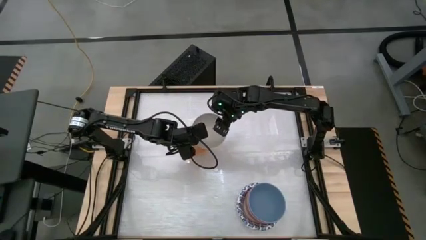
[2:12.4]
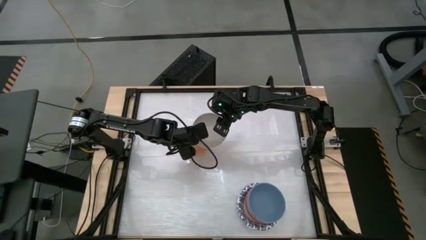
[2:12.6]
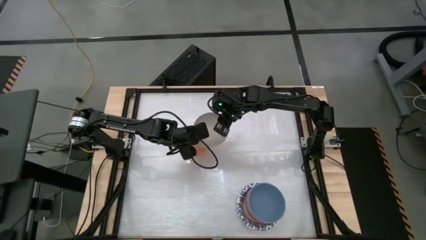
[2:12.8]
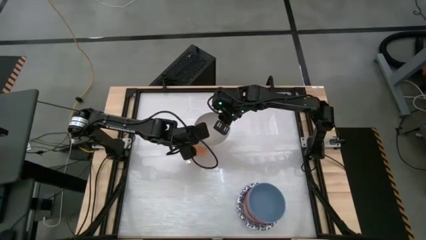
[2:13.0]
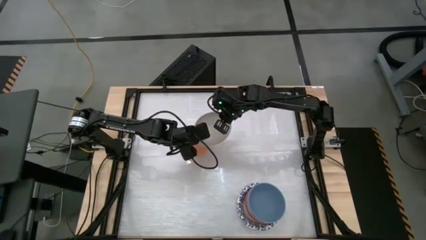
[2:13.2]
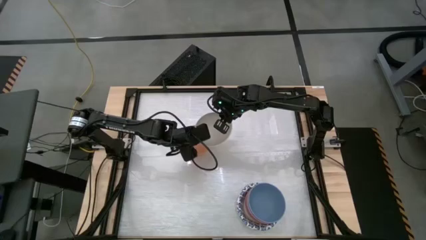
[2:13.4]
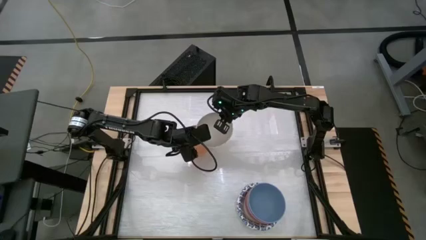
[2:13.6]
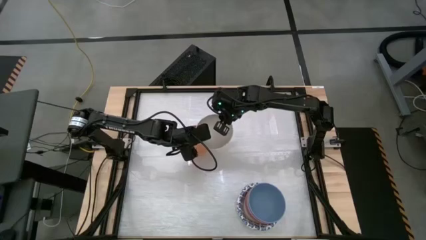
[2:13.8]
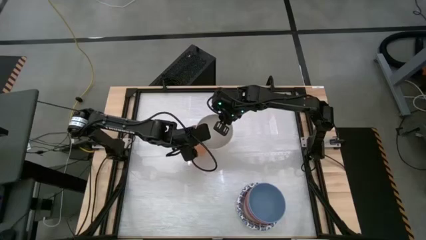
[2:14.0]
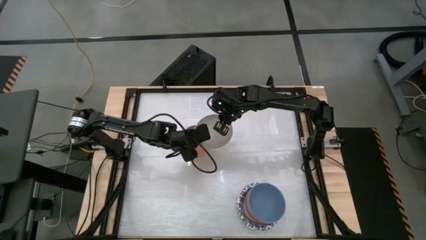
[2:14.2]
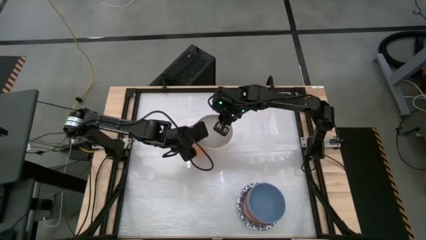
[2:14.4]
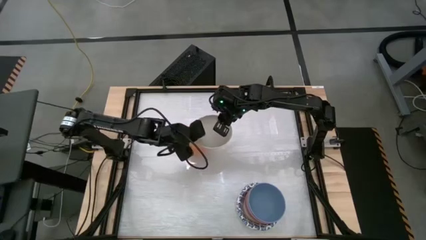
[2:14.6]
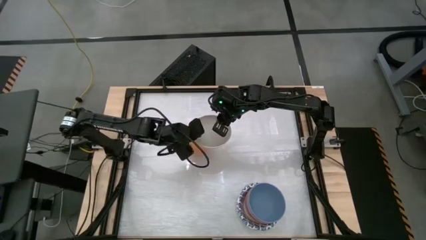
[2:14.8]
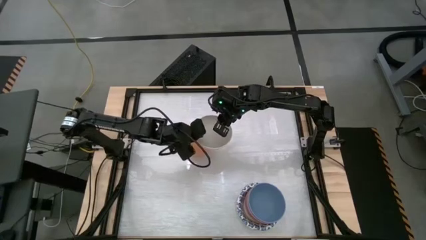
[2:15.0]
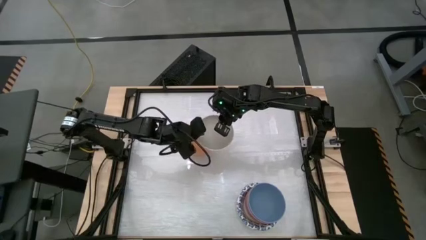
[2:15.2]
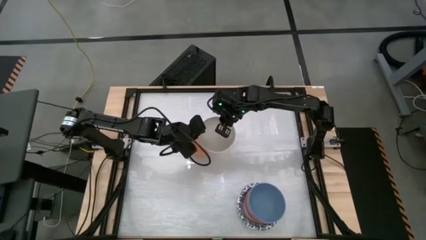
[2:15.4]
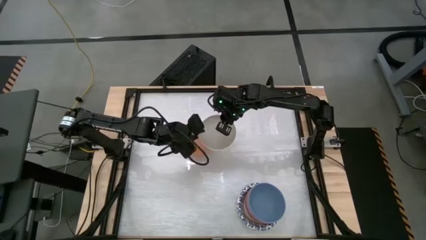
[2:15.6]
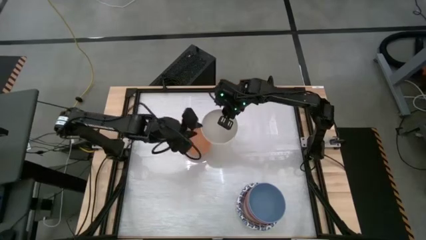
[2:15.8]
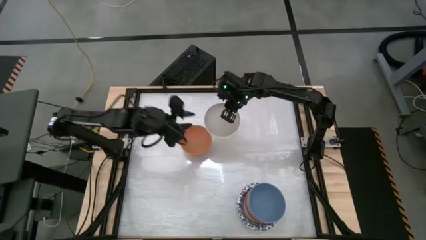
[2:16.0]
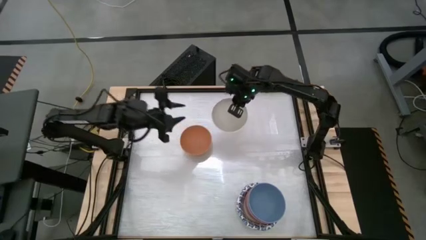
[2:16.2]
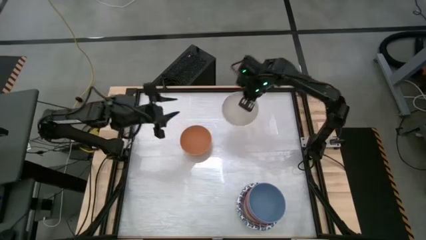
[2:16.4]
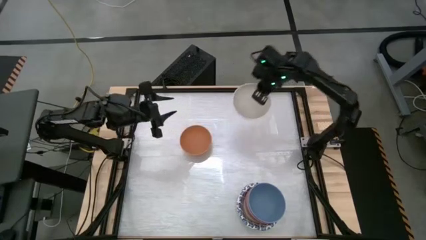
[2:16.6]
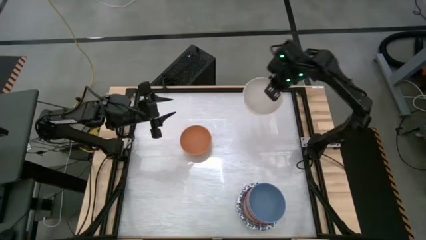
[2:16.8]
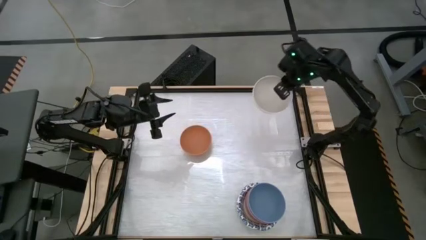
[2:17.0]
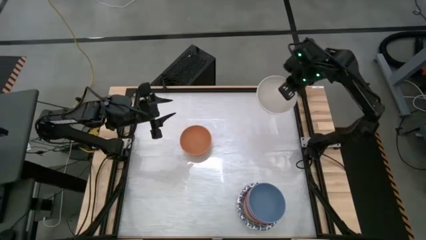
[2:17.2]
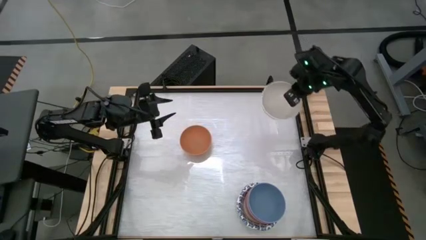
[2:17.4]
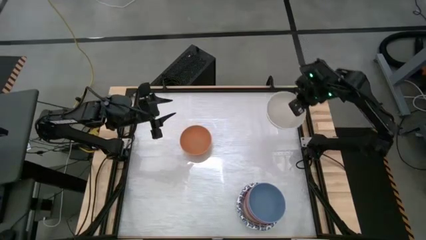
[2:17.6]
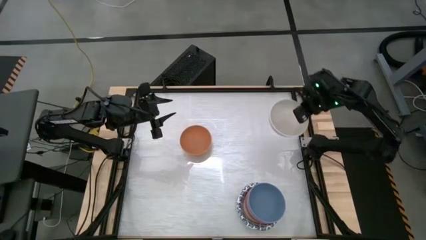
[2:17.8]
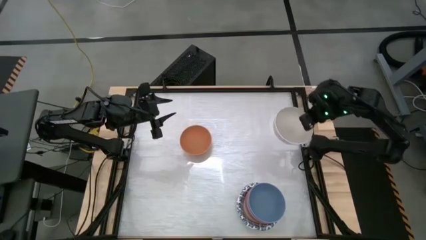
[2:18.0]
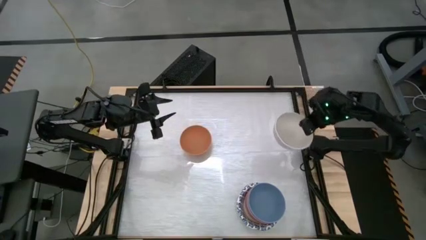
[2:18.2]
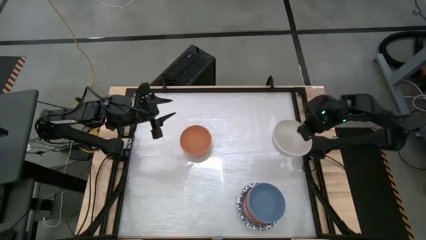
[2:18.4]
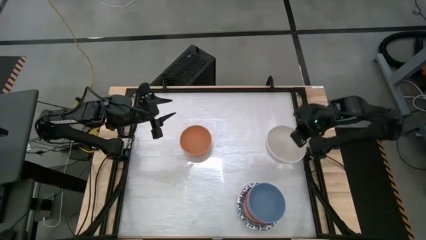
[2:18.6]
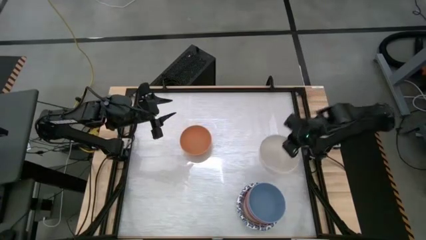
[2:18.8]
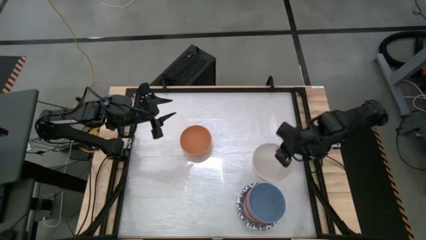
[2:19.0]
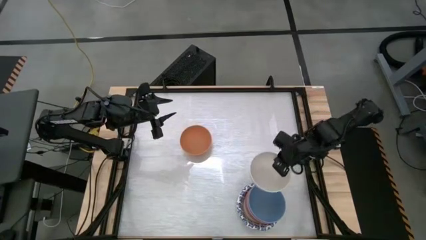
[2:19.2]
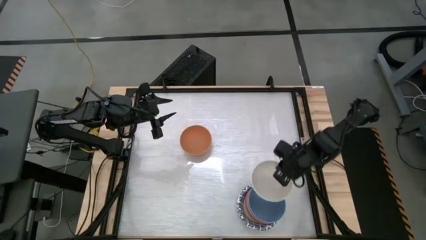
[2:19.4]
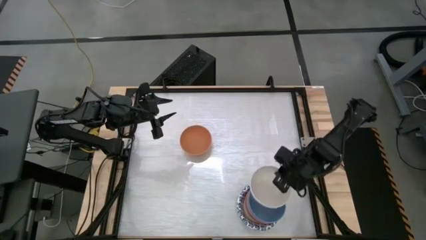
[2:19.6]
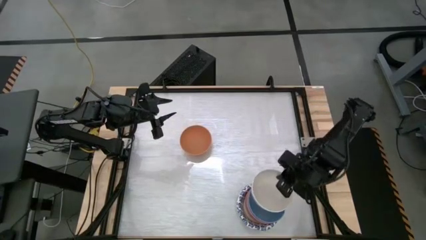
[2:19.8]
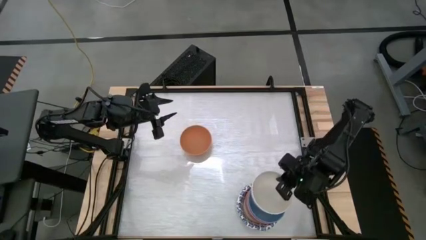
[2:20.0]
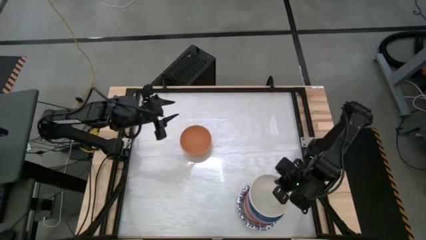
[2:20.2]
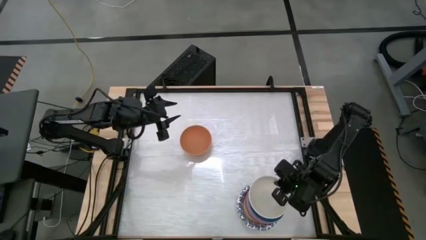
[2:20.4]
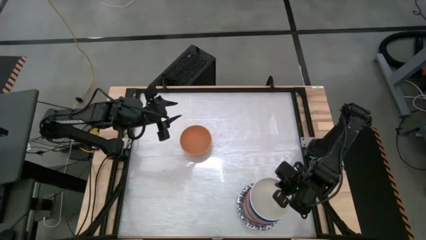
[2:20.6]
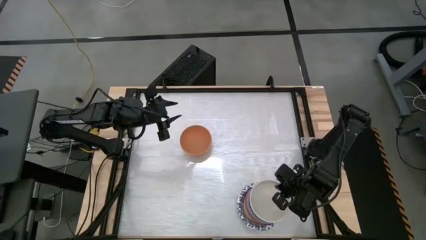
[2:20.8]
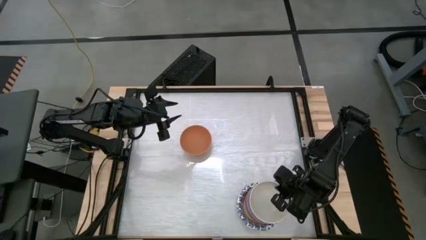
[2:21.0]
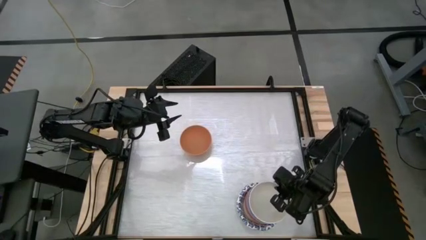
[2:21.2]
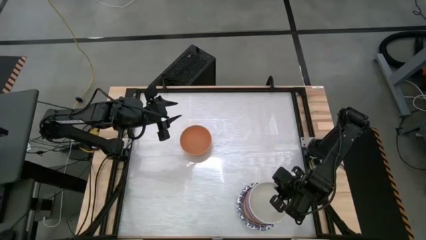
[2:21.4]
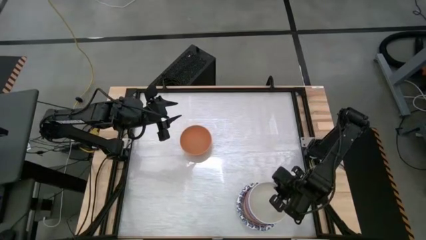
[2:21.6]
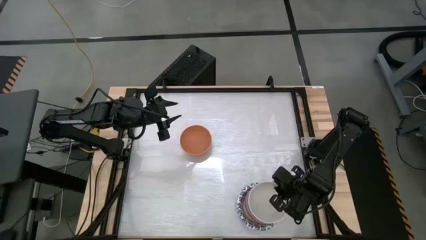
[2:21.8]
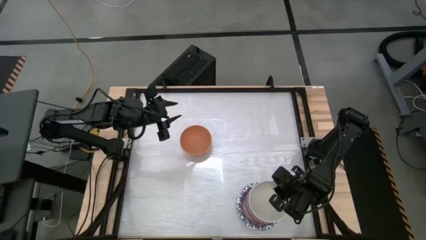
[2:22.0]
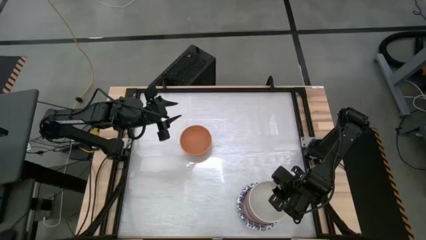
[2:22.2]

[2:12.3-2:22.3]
Stack the white bowl on top of the other blue bowl
